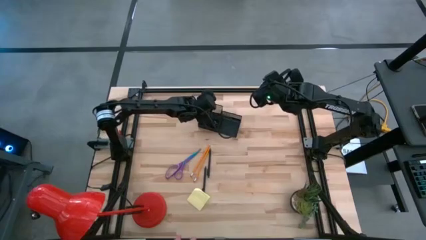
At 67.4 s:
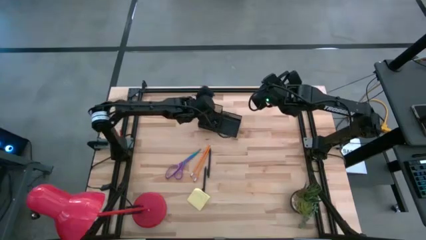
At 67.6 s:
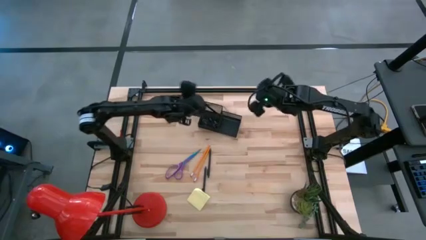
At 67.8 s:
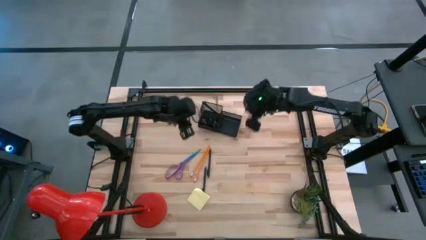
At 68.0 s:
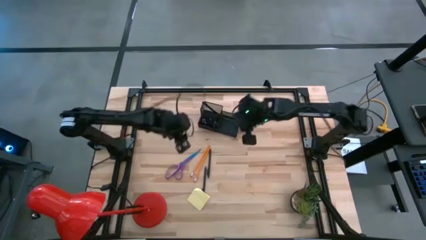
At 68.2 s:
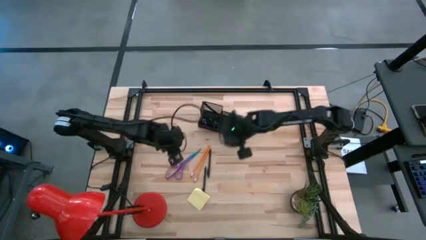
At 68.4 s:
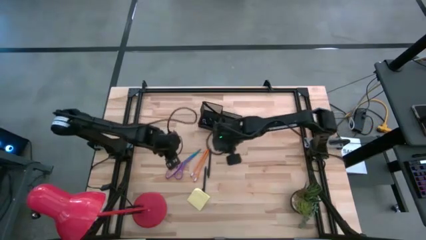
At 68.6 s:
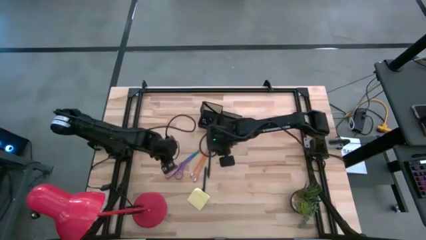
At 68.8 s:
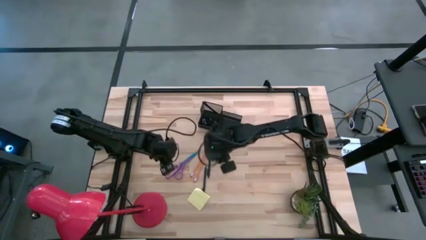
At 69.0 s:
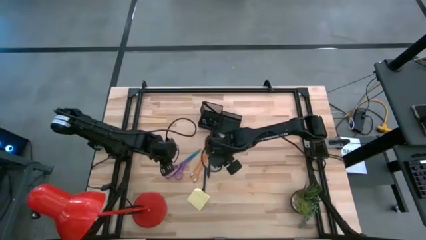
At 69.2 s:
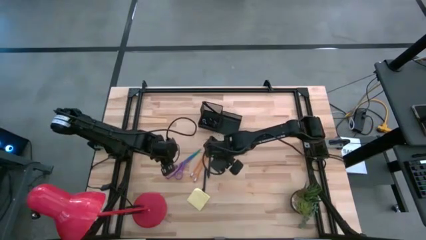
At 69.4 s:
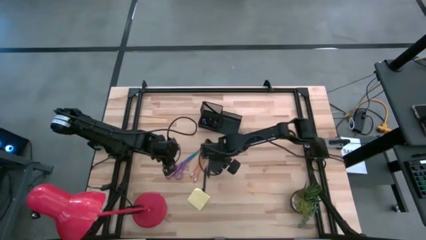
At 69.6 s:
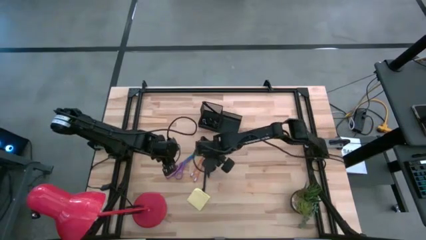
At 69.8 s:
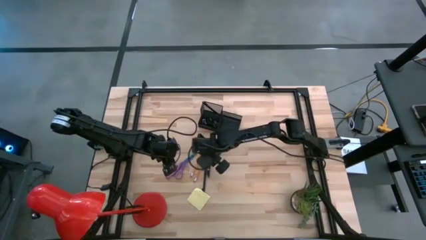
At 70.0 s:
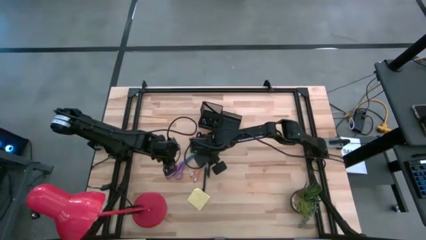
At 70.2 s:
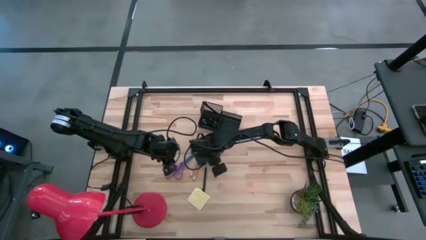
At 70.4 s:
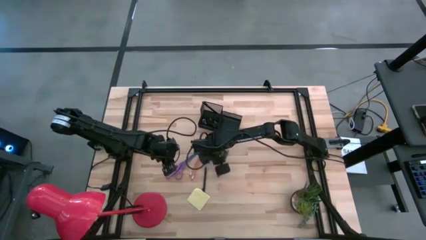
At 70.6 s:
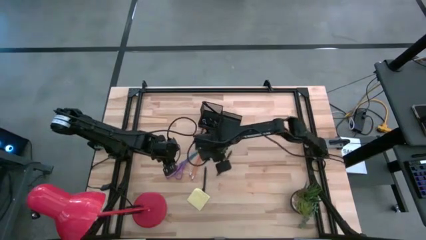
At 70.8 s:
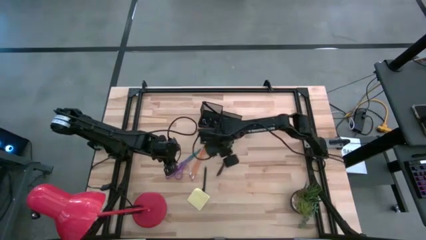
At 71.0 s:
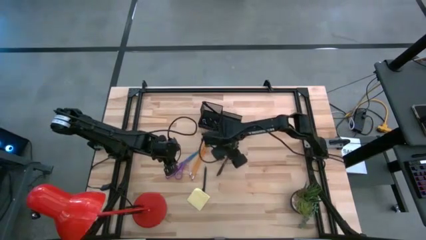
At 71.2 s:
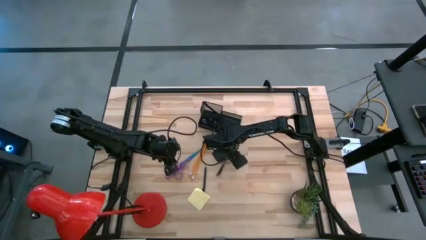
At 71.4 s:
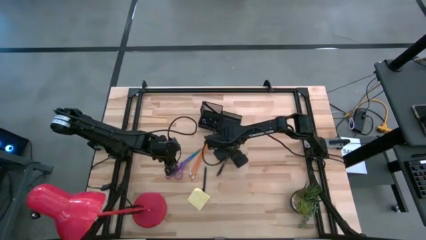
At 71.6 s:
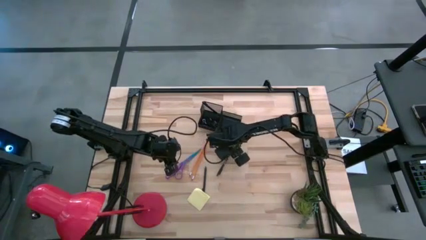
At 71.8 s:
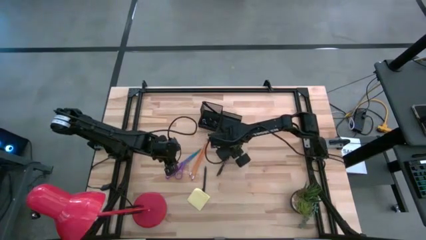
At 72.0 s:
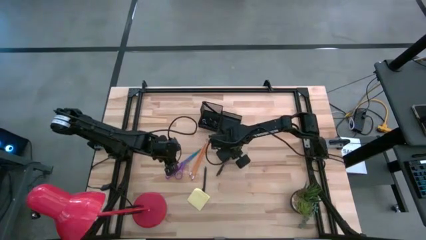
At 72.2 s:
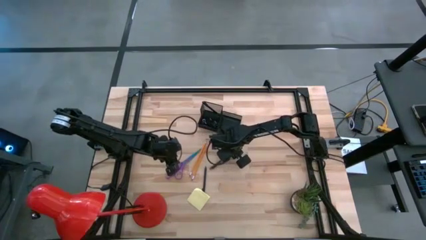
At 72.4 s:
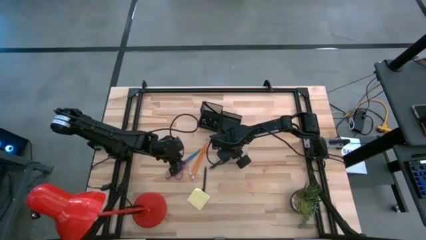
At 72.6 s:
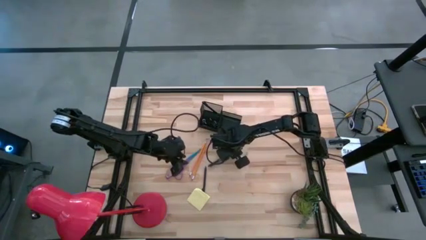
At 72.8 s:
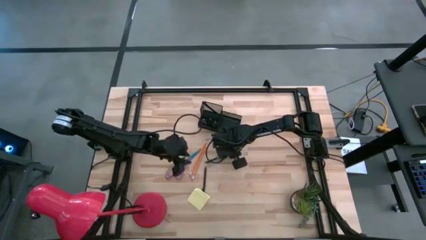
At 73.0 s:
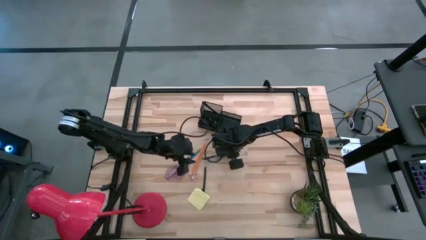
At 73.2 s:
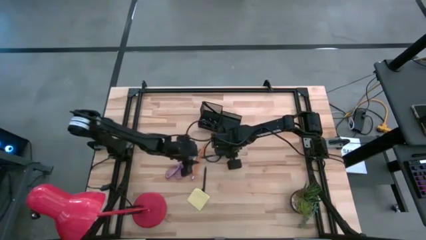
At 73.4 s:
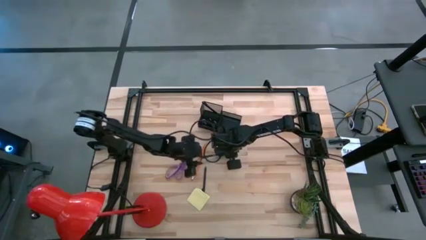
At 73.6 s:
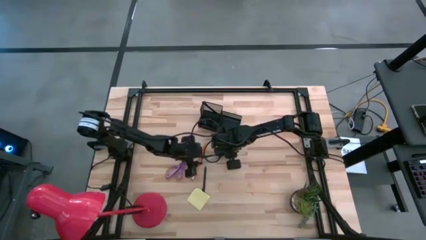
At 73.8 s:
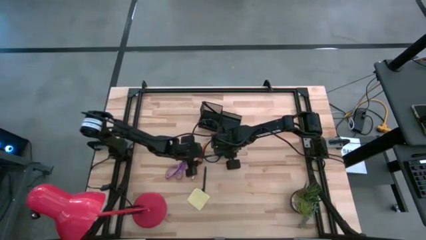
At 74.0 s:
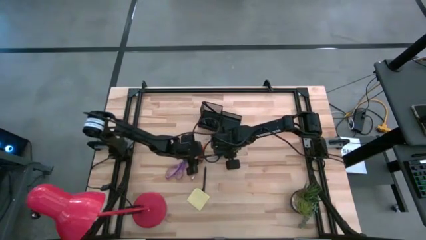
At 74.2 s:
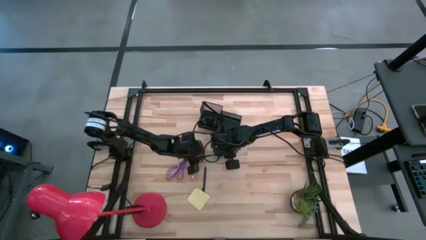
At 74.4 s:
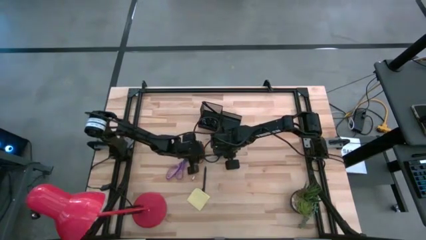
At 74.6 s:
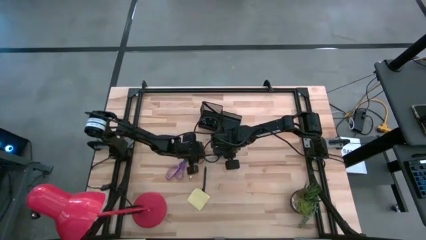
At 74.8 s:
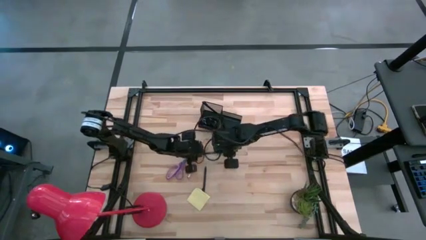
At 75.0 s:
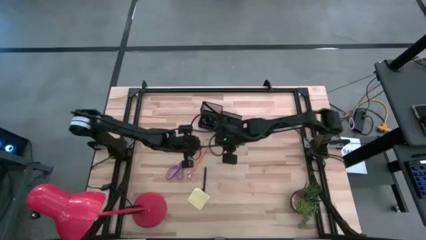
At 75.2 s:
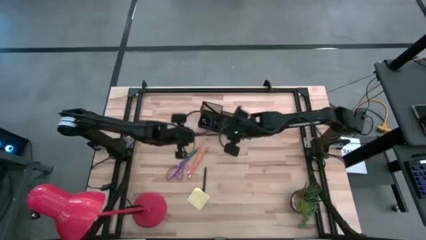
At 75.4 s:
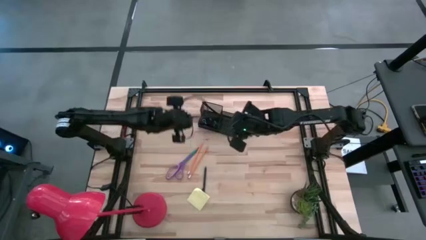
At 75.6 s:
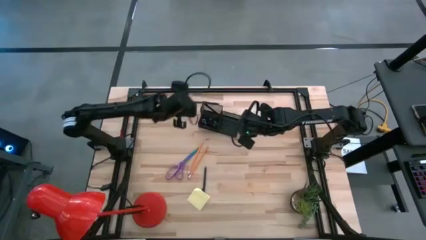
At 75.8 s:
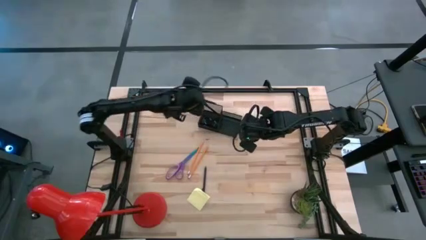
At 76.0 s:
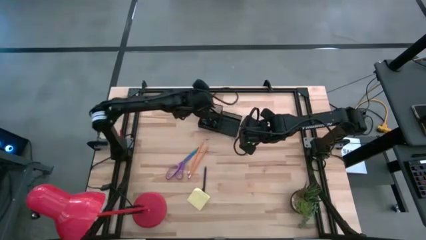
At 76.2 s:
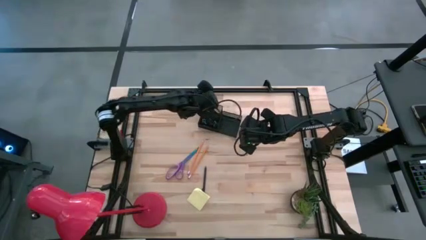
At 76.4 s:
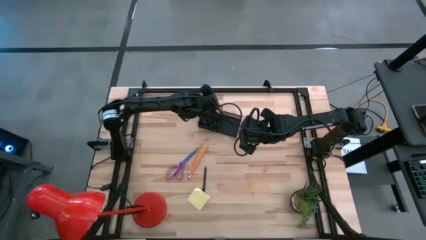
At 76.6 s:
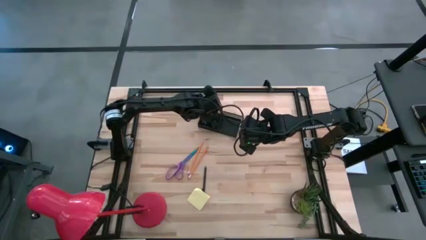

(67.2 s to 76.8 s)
Task: Pick and place office supplies into organizer
Put the top black pen into the black desk organizer

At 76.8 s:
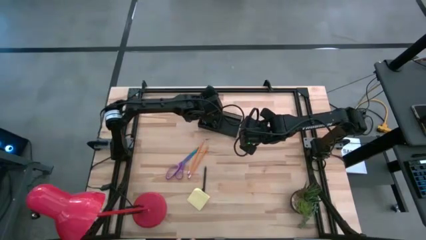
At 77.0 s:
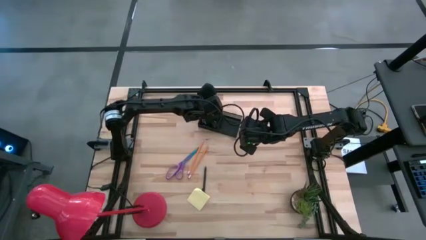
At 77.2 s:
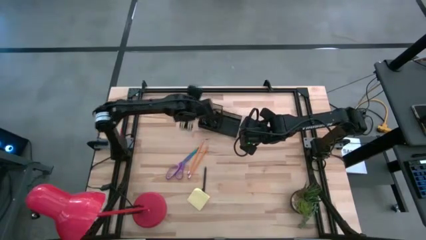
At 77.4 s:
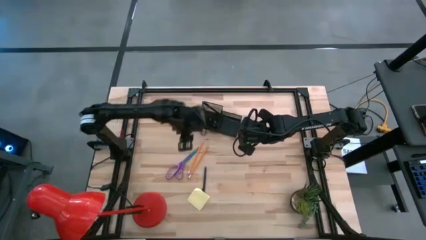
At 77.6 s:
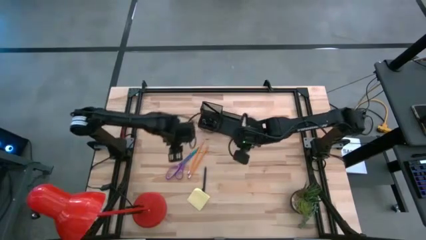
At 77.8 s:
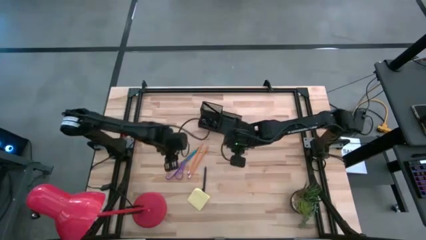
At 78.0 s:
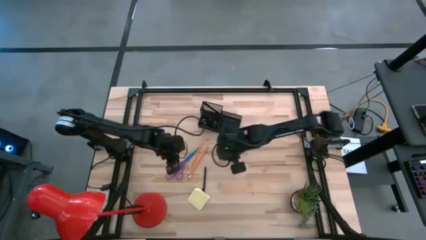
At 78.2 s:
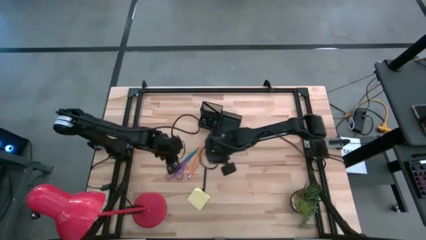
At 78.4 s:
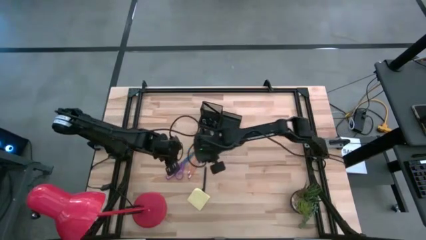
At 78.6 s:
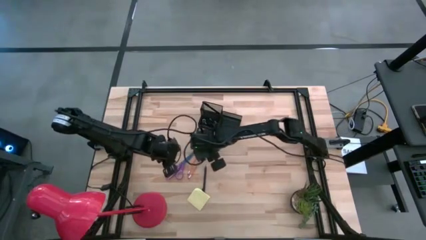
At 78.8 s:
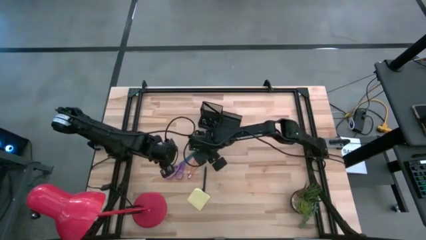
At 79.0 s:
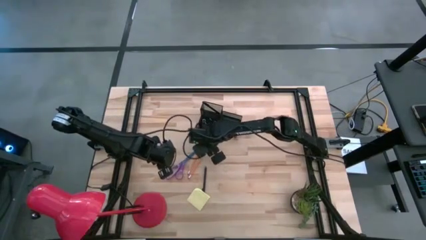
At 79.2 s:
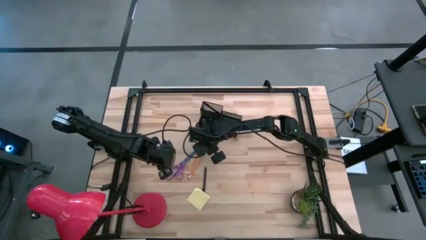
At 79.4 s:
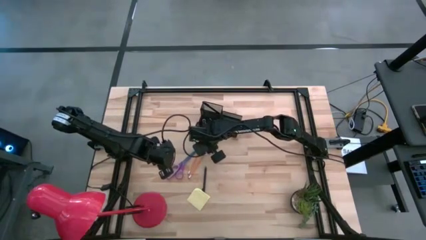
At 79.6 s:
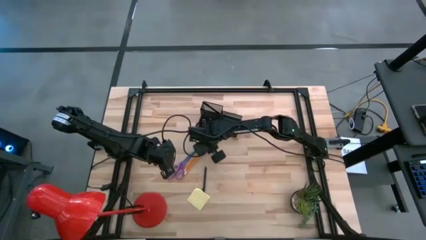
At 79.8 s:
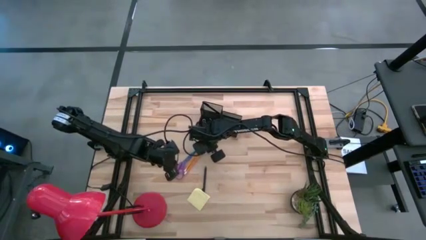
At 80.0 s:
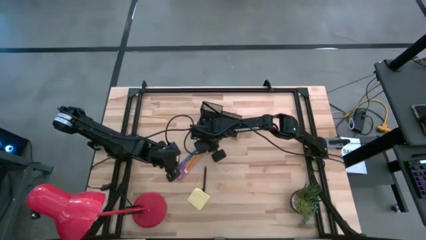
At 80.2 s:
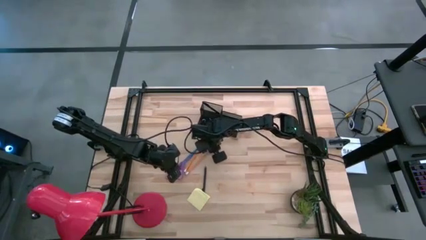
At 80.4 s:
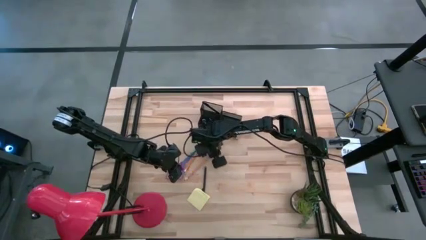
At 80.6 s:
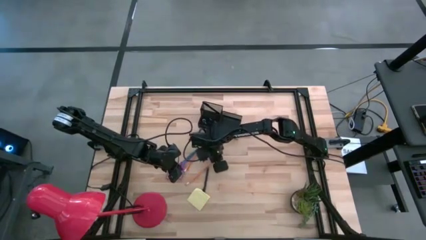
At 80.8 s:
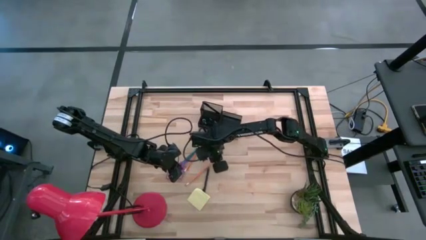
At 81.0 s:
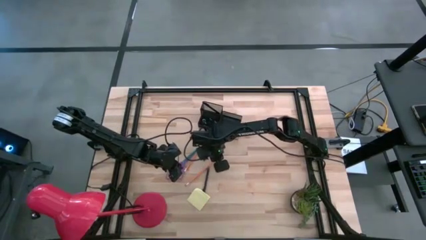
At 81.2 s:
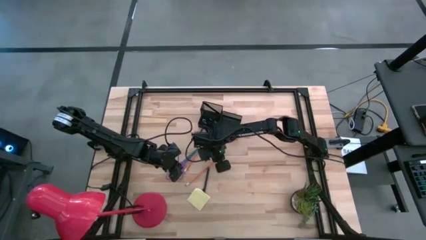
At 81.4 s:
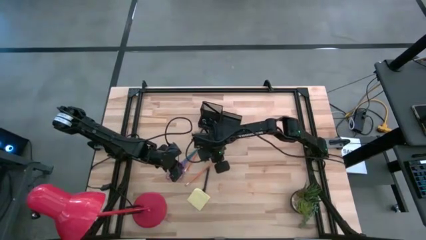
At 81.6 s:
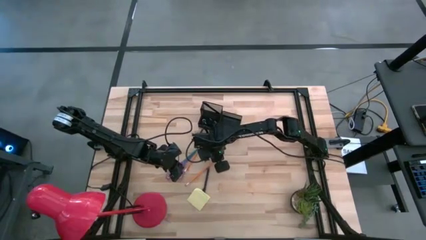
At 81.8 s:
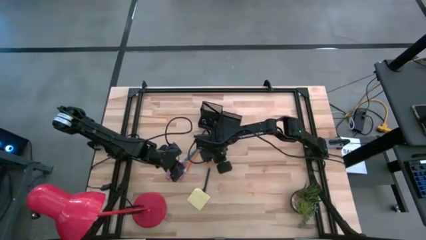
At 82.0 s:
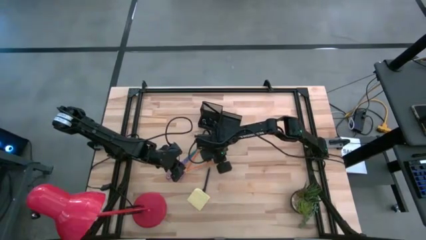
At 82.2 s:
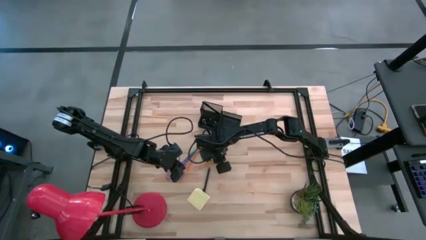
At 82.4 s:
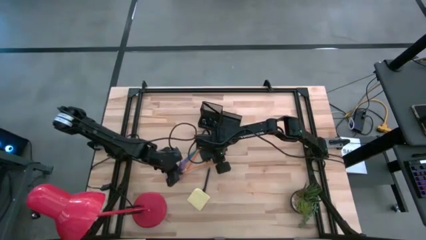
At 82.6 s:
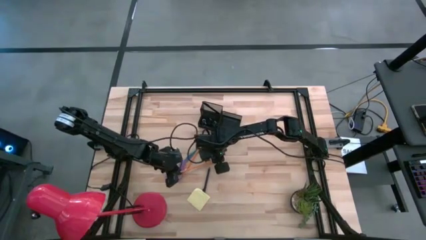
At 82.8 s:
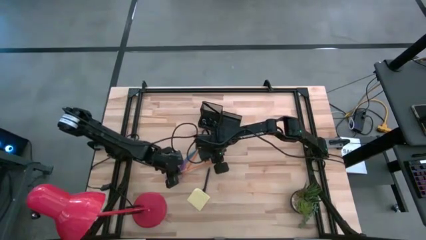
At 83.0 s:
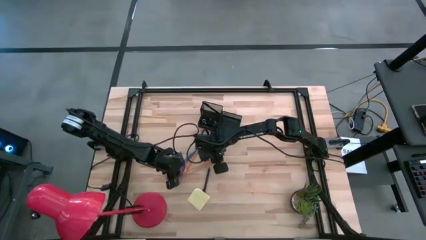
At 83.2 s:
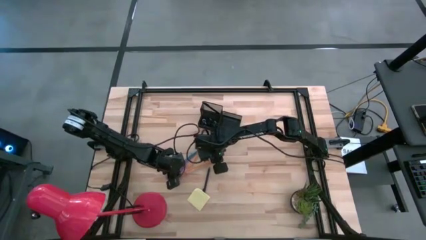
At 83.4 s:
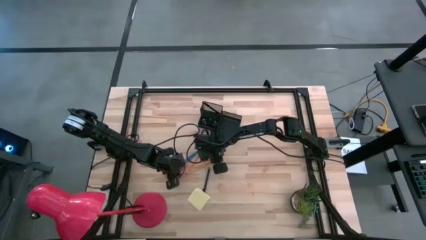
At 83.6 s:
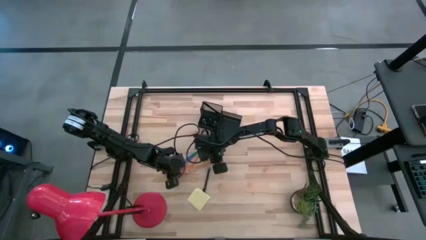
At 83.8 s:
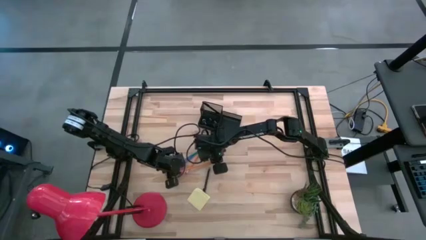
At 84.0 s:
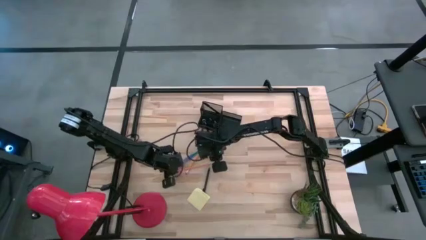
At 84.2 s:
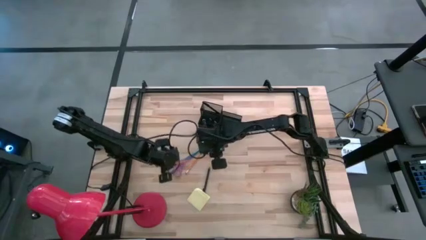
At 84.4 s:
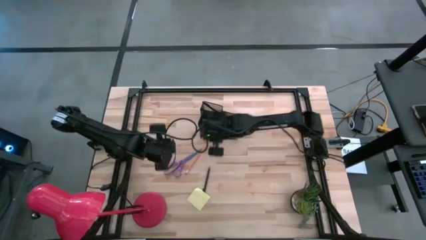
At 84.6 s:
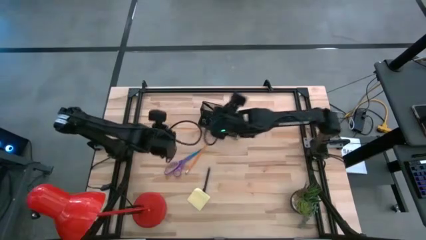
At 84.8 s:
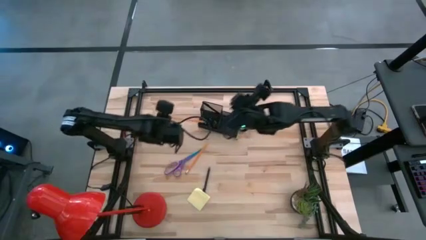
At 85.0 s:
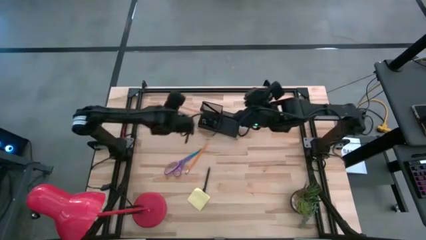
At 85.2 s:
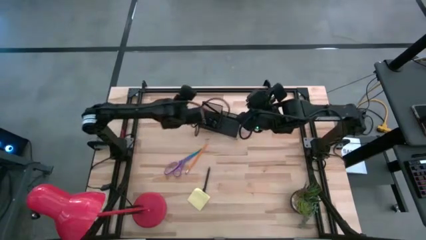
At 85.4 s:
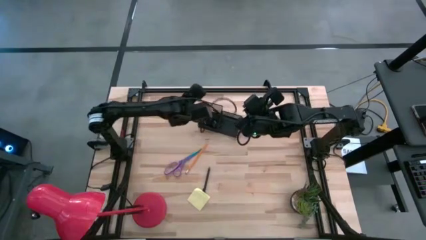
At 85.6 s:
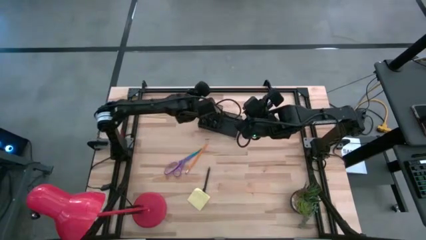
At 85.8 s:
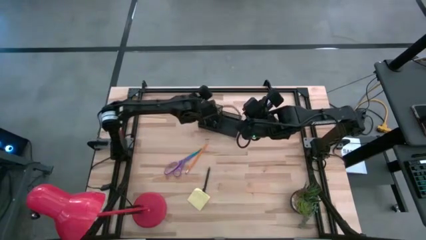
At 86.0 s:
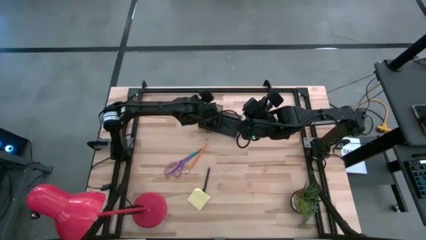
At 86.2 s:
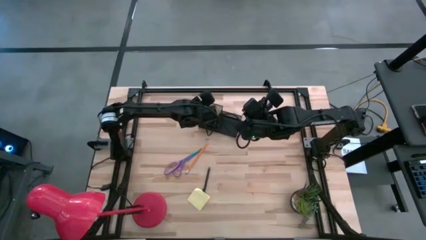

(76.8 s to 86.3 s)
Put the right orange pencil into the black desk organizer
